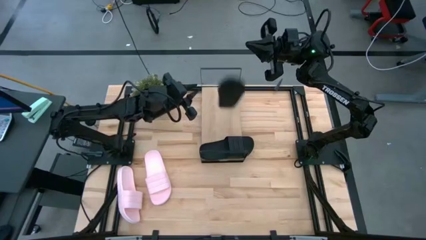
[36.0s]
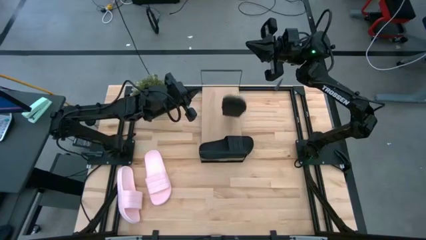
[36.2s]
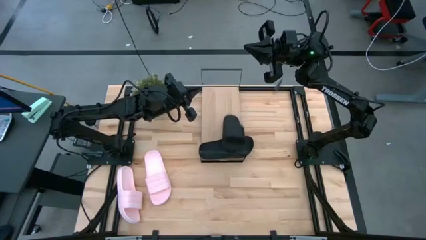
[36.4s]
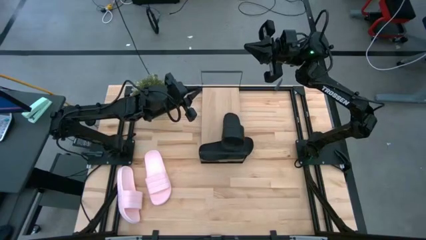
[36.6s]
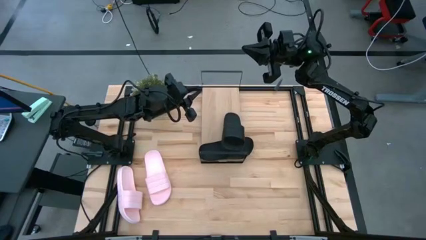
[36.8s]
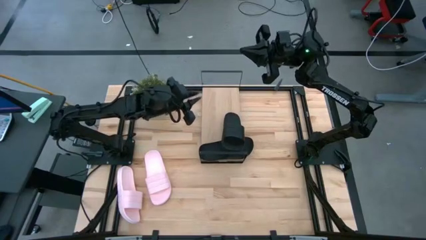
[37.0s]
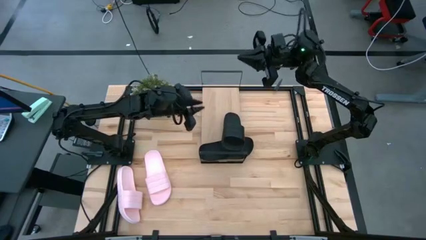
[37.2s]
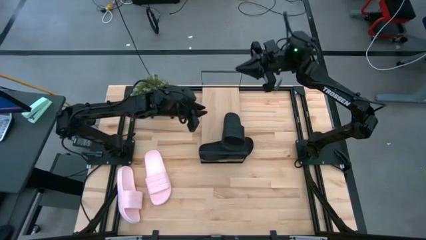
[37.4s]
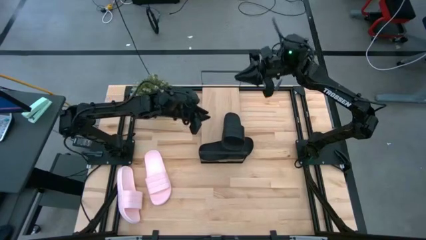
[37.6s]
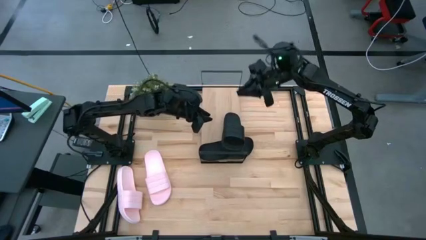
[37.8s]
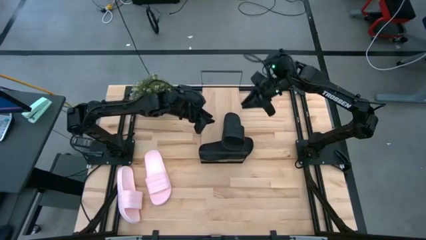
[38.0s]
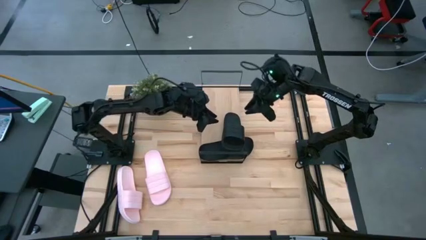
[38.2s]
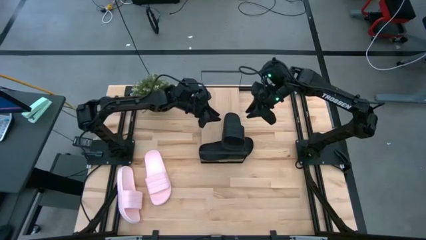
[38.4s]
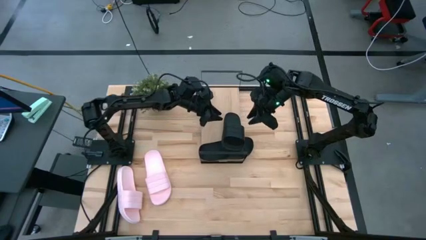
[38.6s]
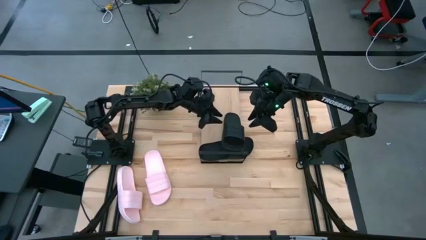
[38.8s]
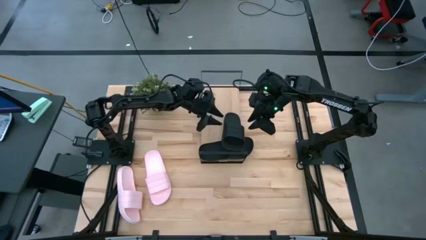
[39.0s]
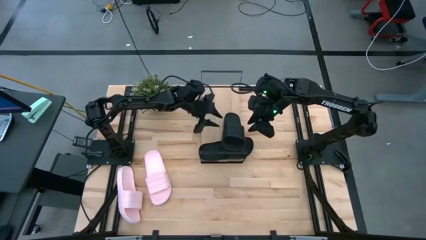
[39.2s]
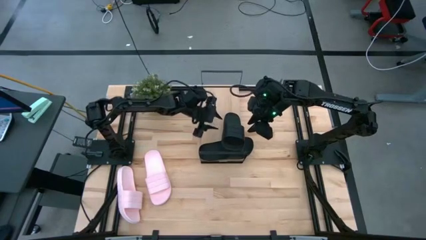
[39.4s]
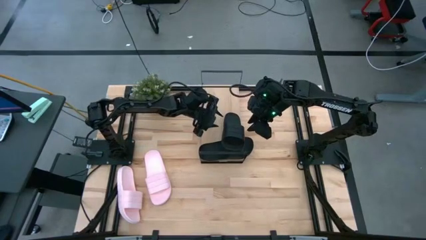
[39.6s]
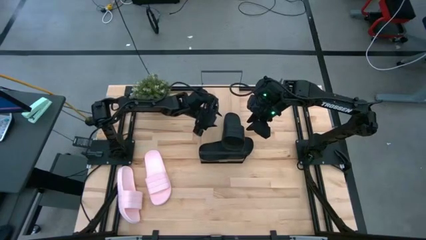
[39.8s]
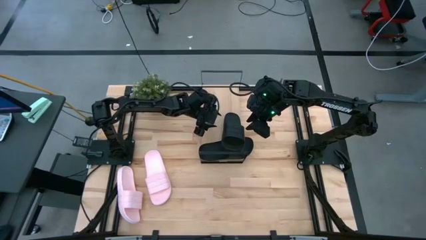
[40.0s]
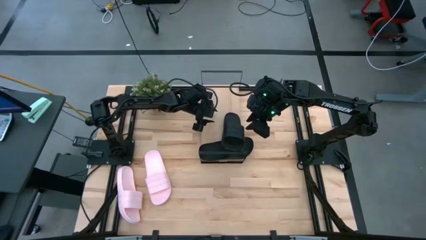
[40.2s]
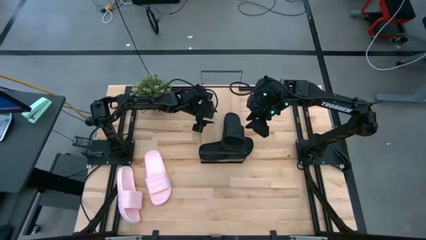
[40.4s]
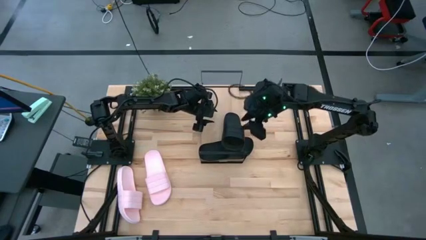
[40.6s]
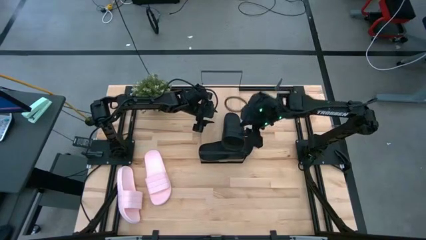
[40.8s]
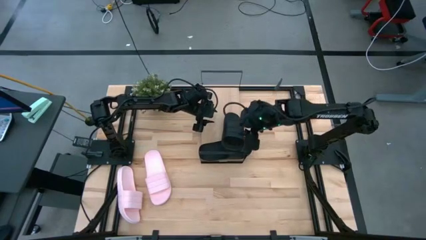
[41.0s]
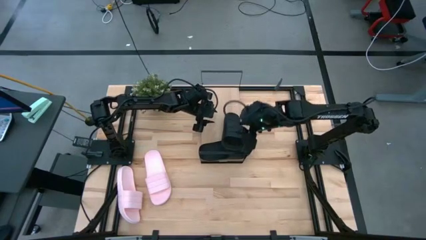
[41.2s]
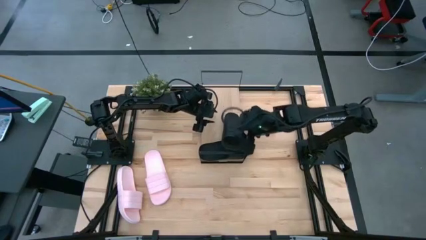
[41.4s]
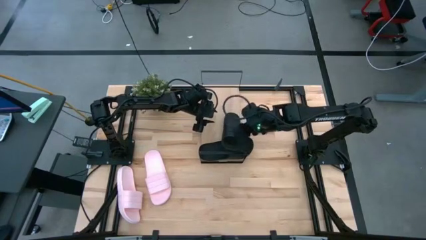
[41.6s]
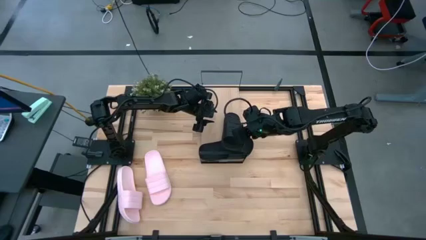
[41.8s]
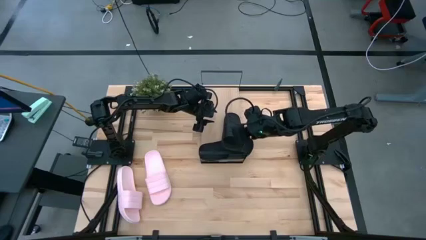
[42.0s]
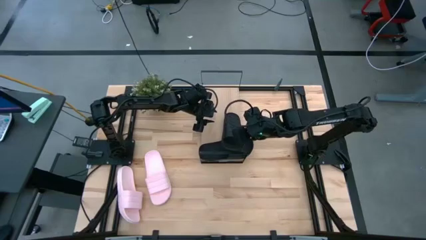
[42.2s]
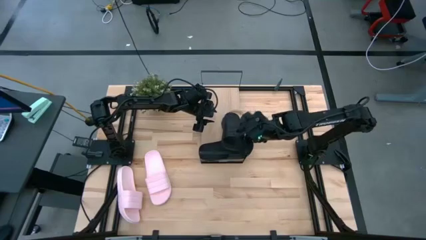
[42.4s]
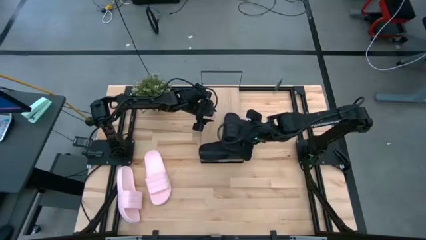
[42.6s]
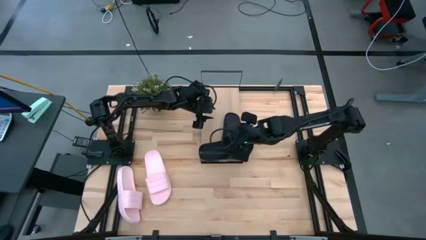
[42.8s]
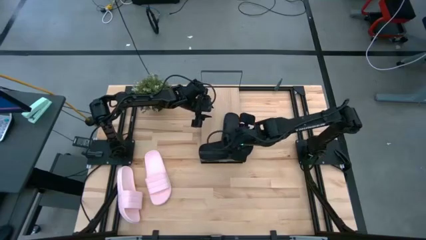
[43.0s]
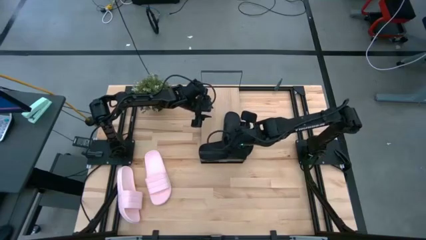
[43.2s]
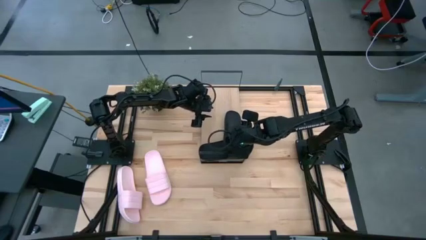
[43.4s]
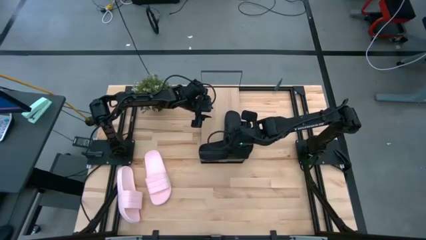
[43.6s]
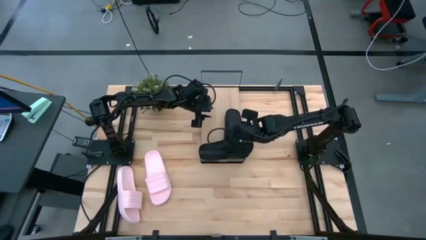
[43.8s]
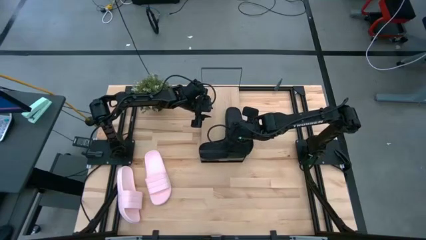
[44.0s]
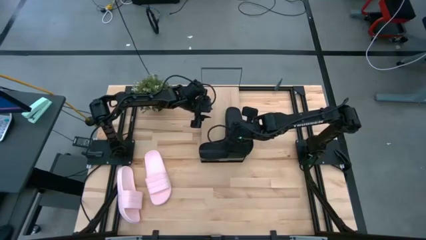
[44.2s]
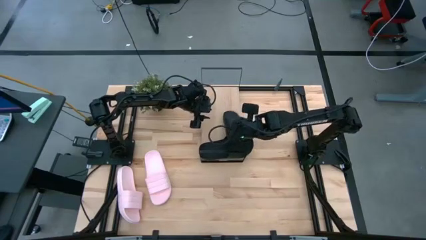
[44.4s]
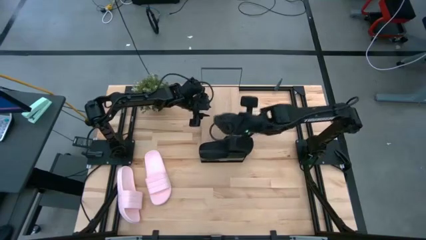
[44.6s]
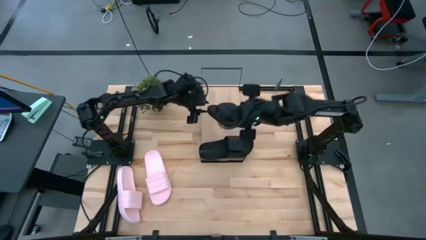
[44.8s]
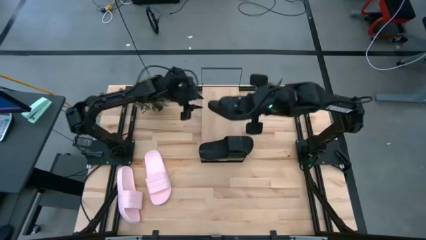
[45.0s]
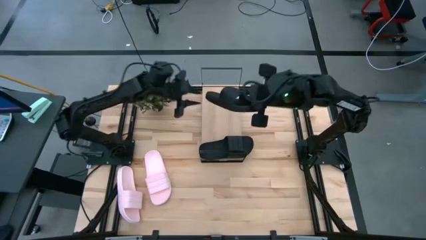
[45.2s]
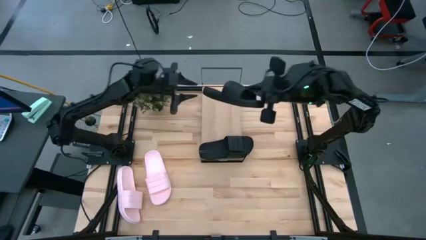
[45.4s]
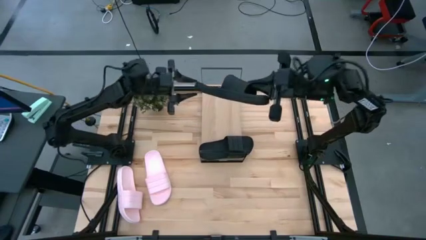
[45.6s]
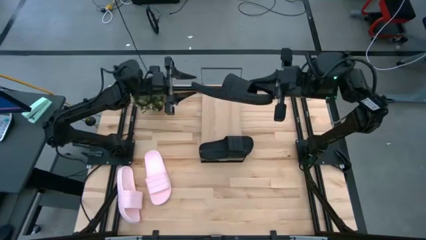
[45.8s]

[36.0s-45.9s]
Task: Pick and place slides into the shelf
Put the black slipper on the shelf

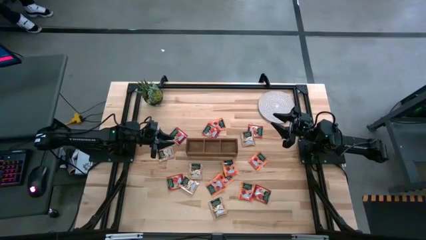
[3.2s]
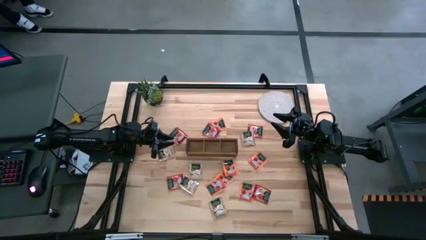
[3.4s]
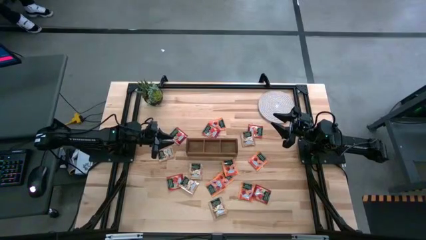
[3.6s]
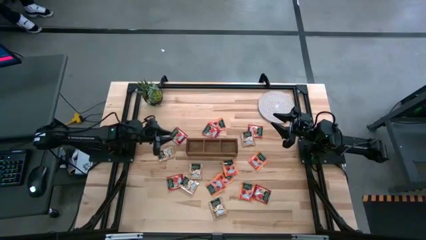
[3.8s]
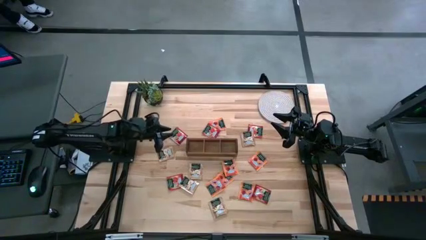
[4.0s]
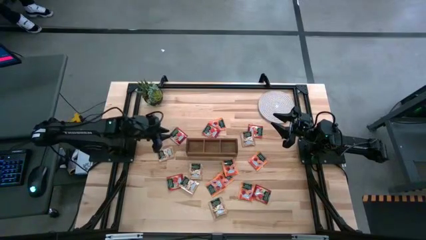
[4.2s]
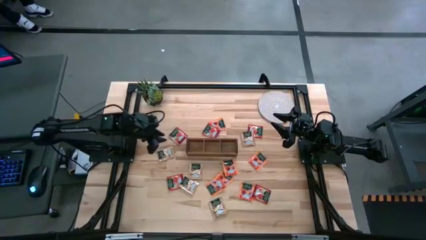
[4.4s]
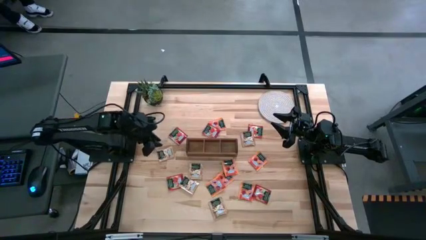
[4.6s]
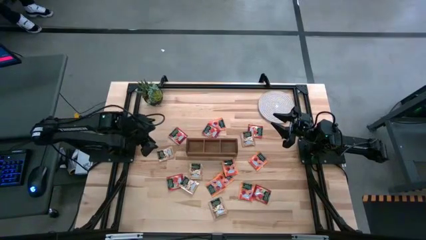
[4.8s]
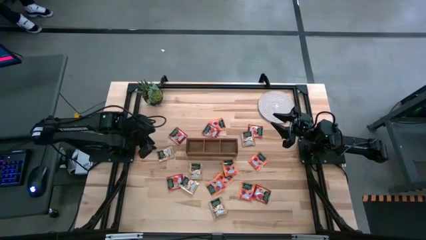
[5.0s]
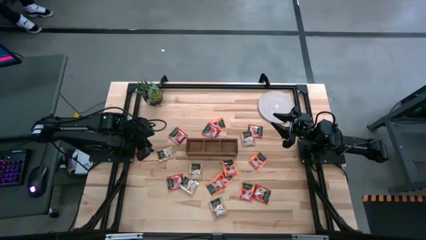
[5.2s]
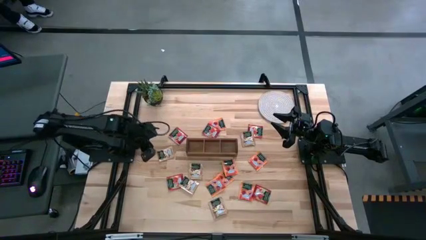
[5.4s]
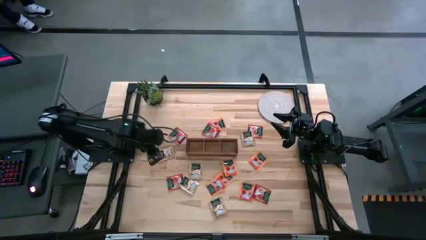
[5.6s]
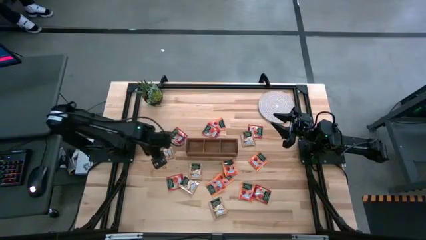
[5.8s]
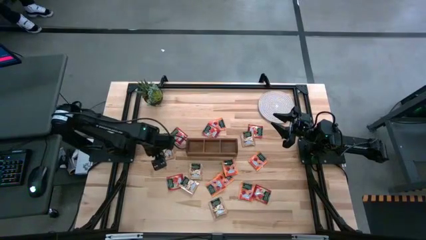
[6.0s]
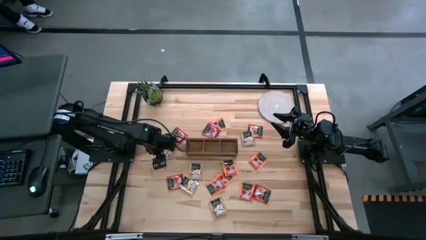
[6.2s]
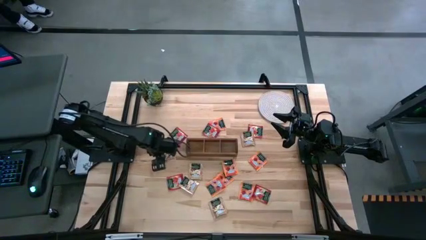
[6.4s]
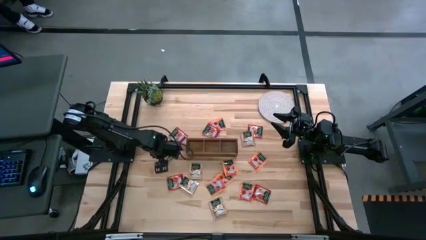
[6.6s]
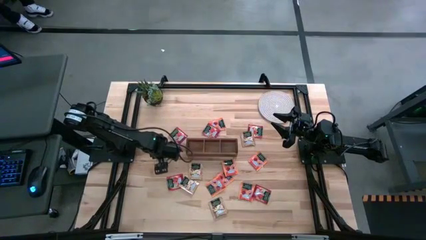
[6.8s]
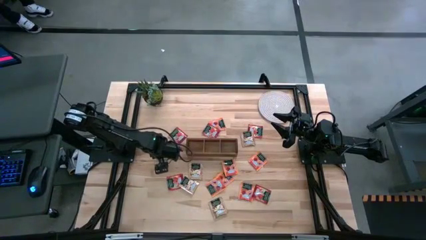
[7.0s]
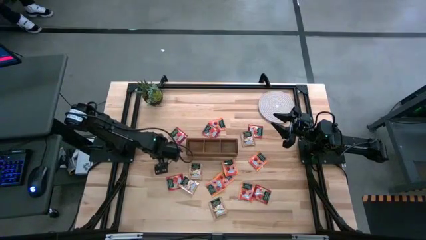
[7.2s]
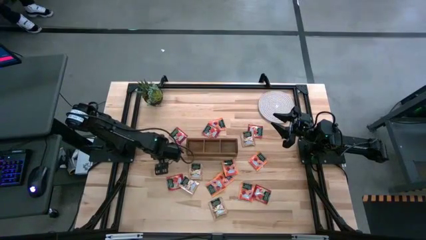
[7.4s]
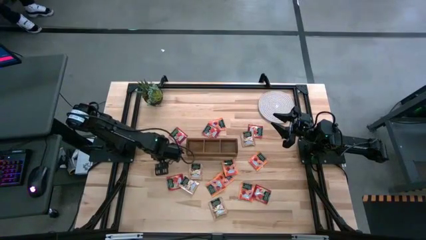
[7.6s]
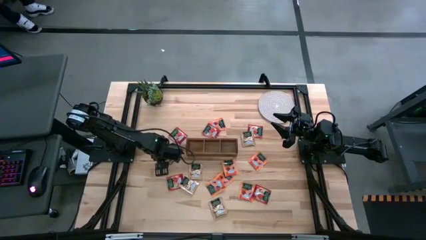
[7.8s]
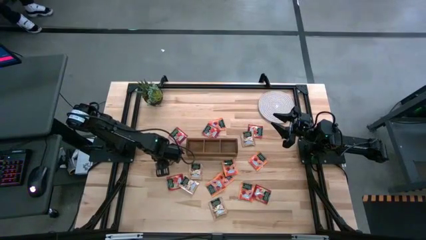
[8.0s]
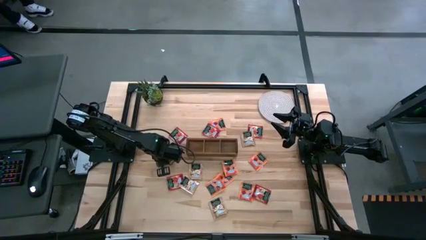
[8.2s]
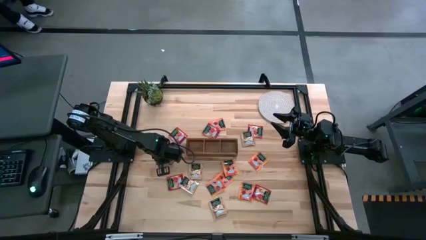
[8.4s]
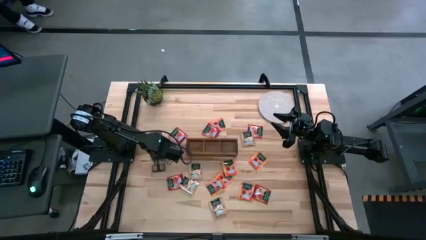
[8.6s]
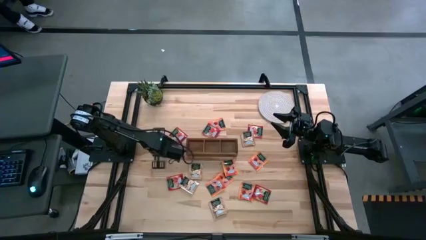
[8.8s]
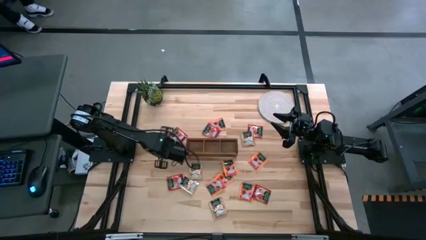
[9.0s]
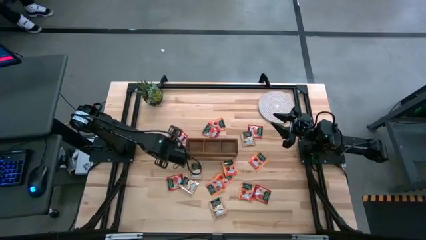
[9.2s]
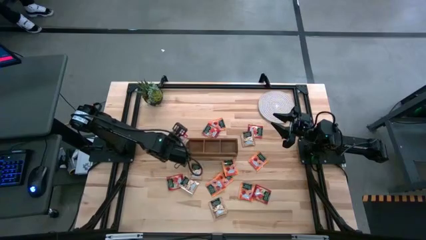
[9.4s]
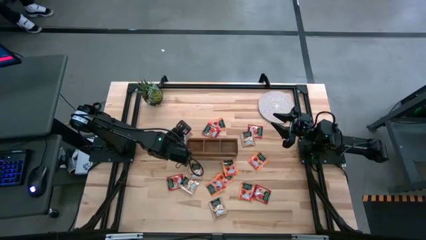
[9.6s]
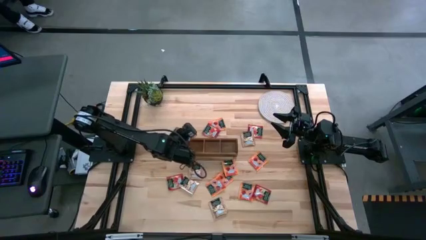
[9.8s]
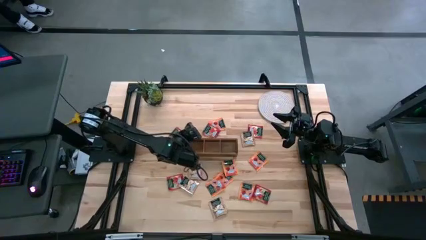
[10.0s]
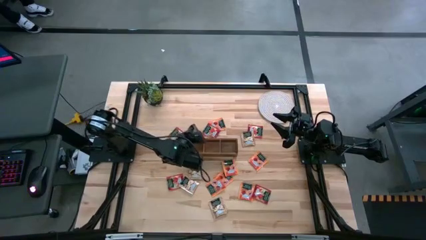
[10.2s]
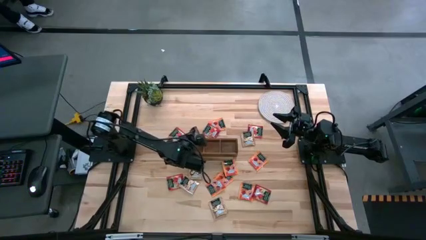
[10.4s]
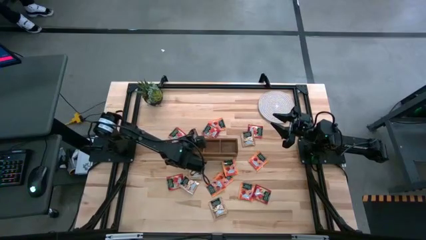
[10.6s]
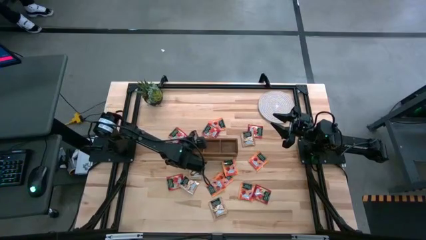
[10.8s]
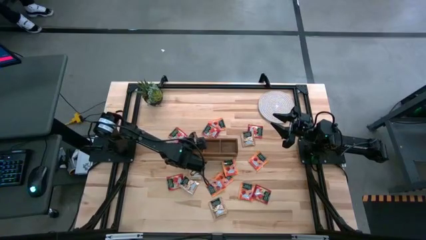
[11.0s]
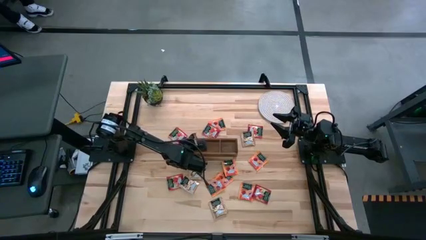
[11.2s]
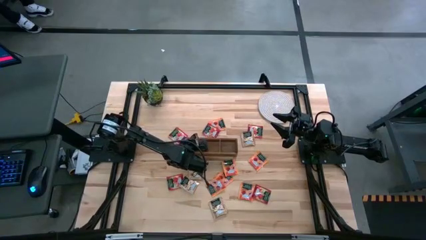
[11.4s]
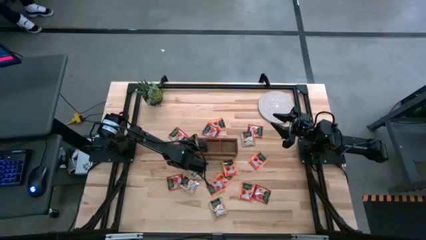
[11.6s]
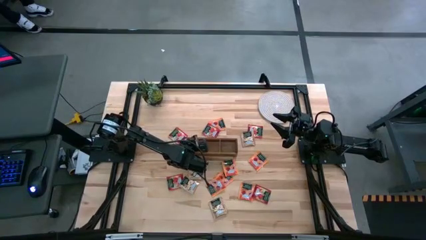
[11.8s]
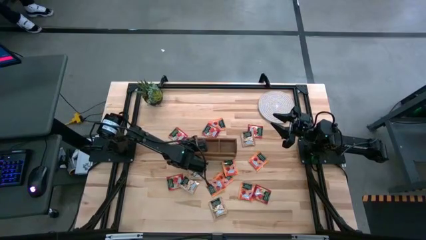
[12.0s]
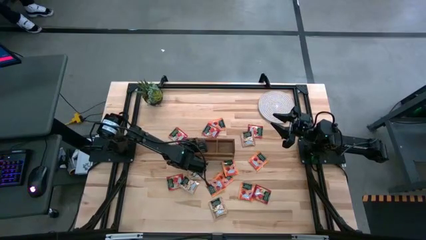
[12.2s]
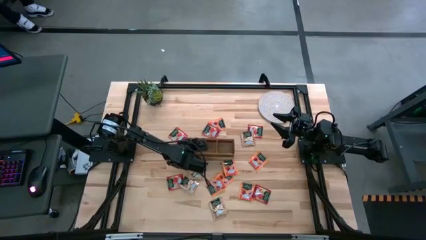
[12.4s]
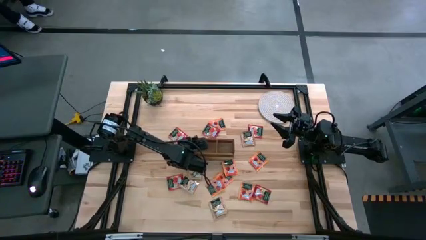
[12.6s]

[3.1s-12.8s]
Task: Pick & Place Tea
Put the brown tea bag into the left section of the brown wooden organizer
